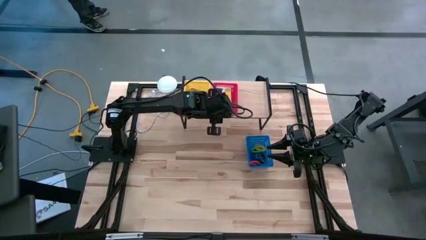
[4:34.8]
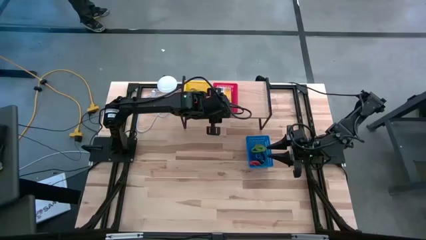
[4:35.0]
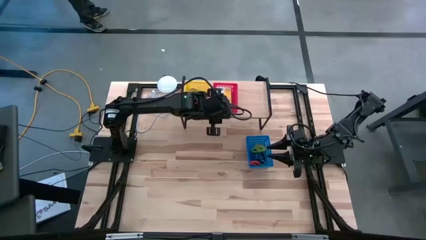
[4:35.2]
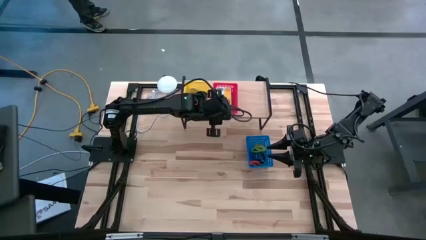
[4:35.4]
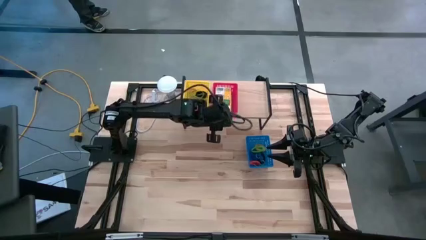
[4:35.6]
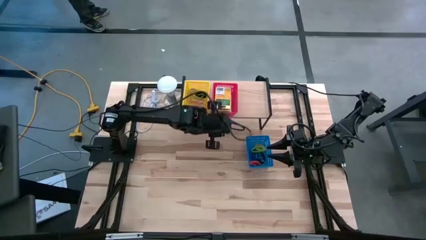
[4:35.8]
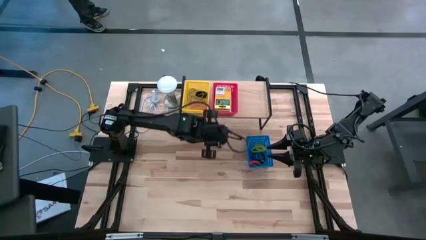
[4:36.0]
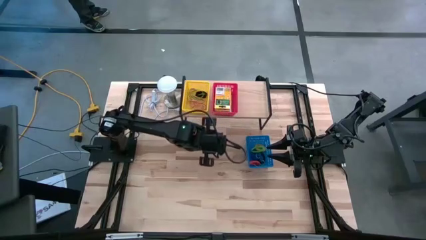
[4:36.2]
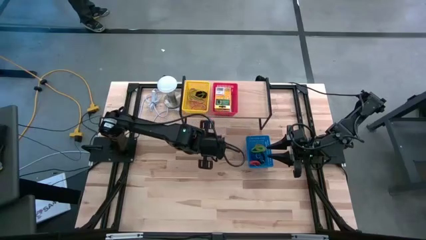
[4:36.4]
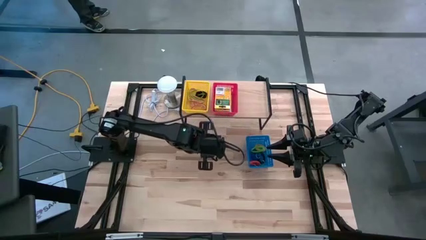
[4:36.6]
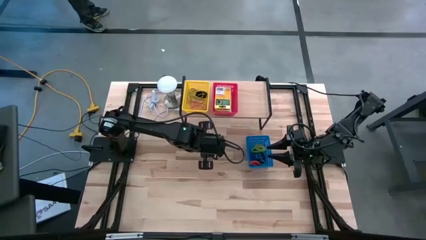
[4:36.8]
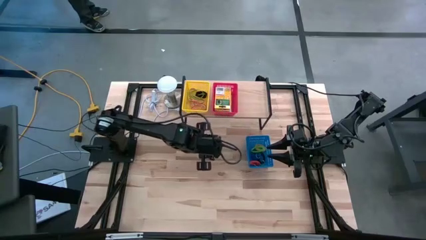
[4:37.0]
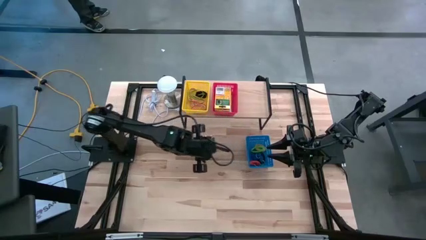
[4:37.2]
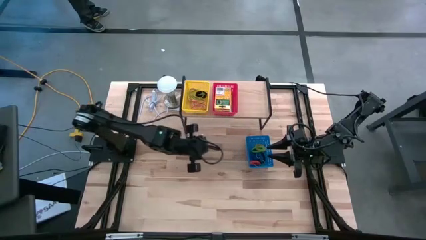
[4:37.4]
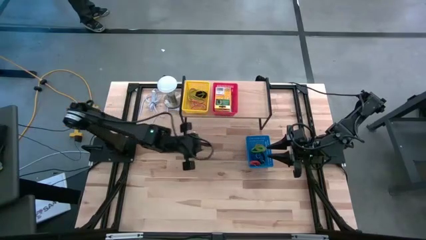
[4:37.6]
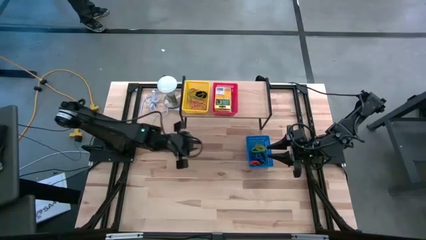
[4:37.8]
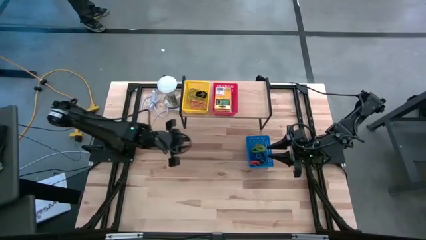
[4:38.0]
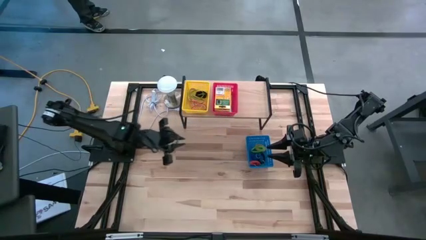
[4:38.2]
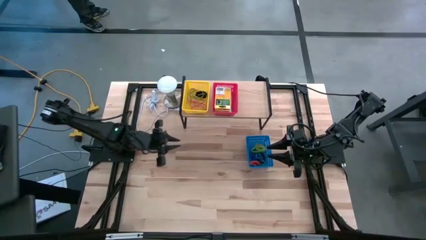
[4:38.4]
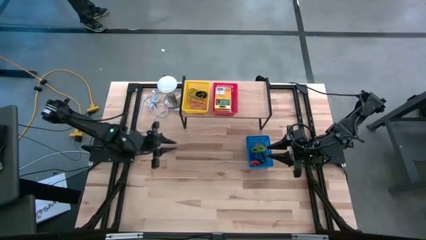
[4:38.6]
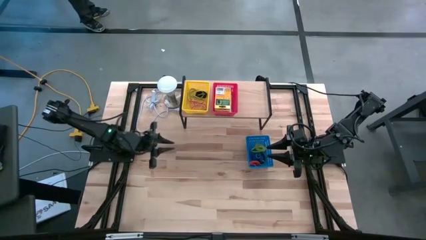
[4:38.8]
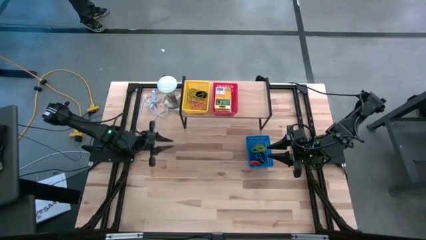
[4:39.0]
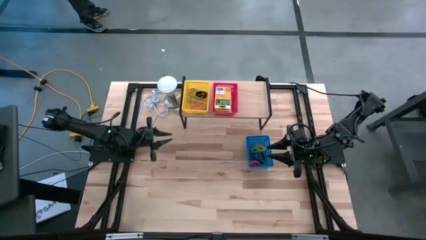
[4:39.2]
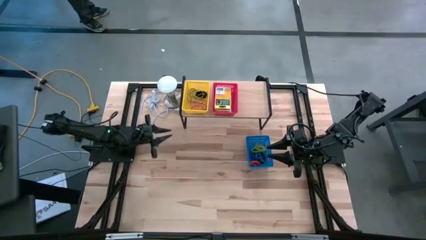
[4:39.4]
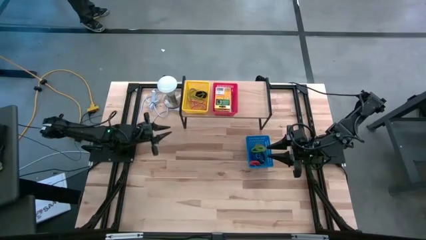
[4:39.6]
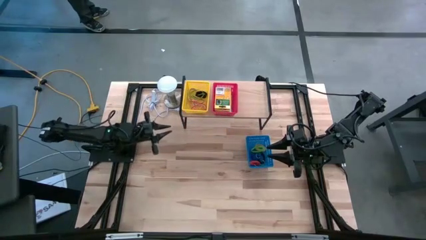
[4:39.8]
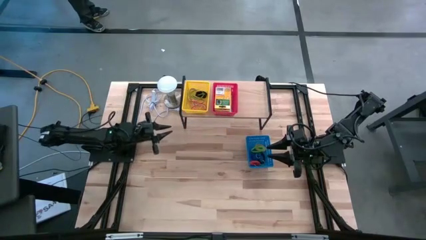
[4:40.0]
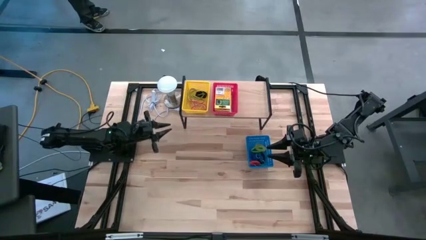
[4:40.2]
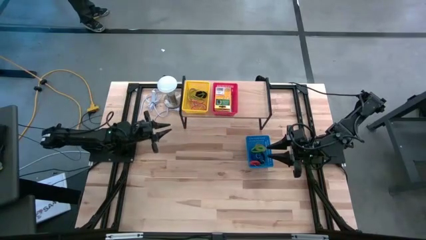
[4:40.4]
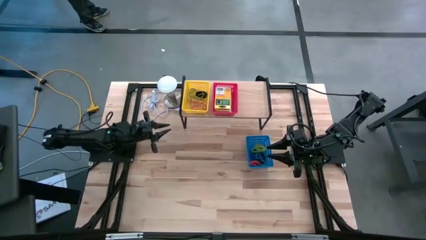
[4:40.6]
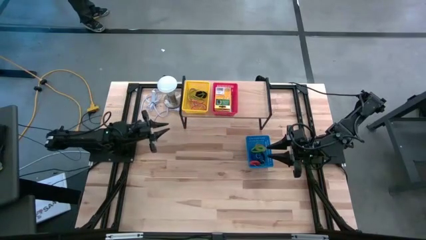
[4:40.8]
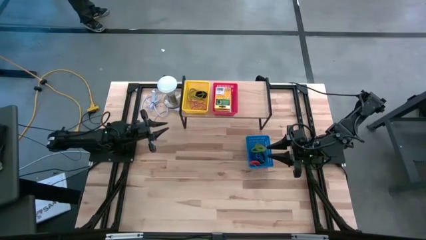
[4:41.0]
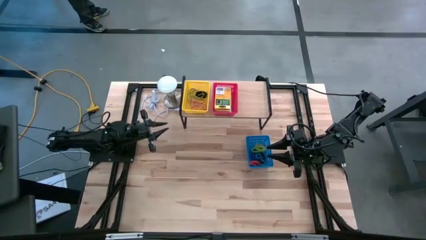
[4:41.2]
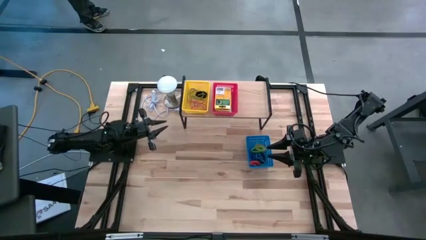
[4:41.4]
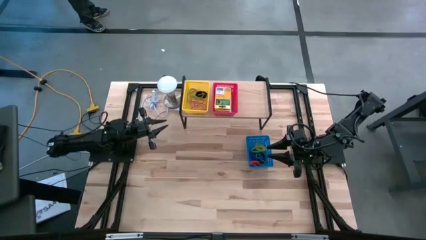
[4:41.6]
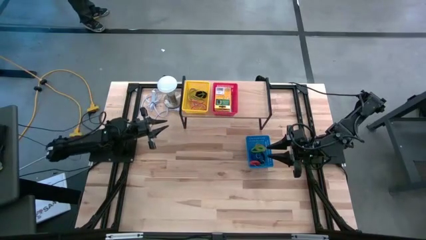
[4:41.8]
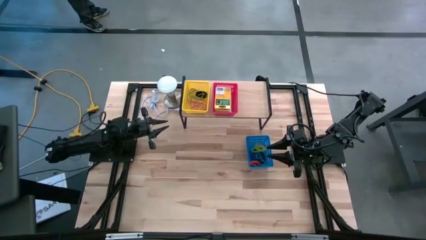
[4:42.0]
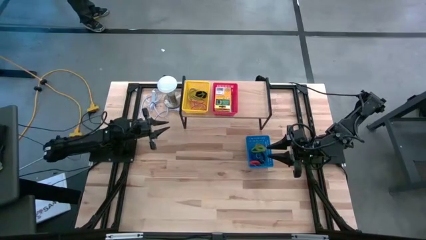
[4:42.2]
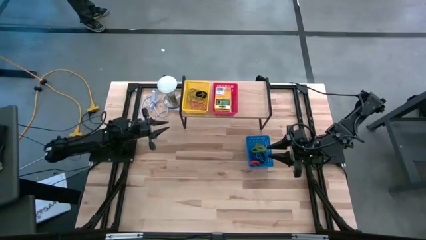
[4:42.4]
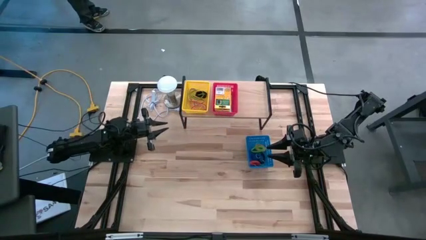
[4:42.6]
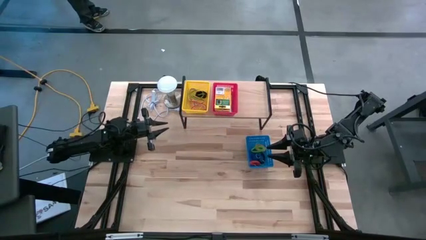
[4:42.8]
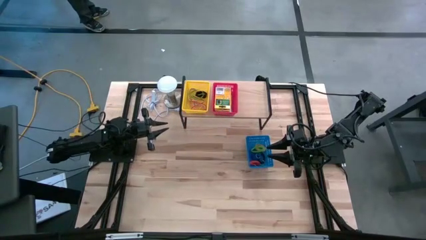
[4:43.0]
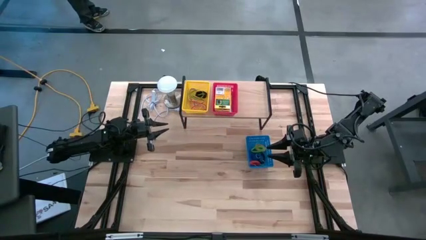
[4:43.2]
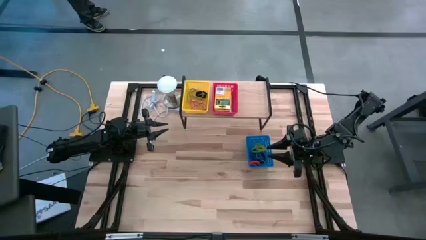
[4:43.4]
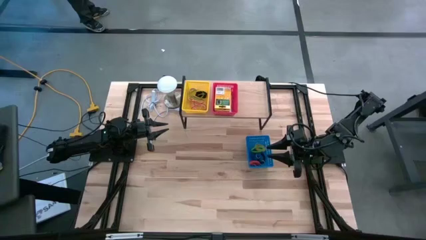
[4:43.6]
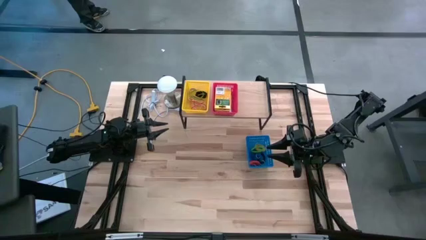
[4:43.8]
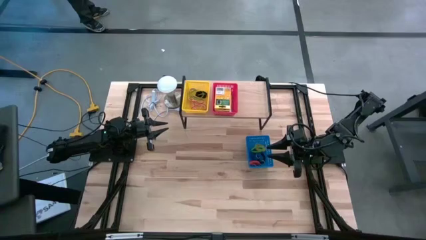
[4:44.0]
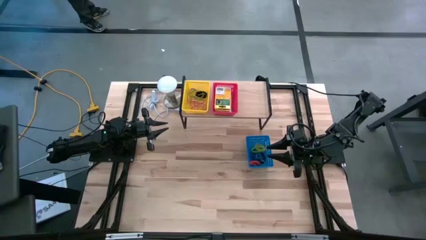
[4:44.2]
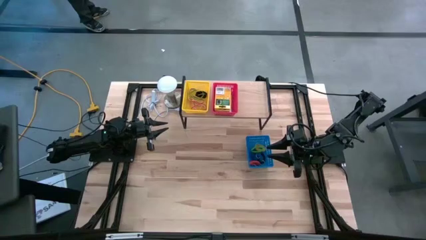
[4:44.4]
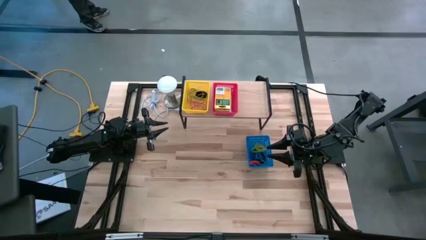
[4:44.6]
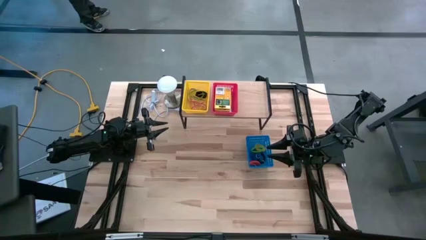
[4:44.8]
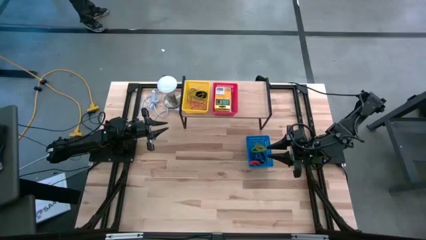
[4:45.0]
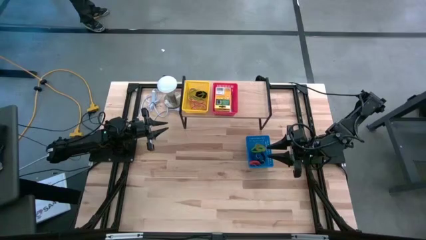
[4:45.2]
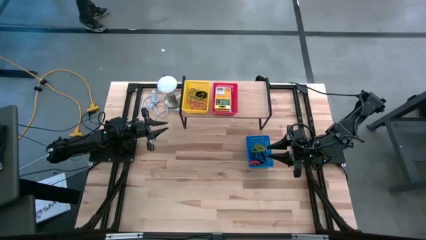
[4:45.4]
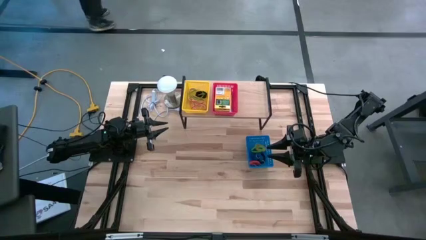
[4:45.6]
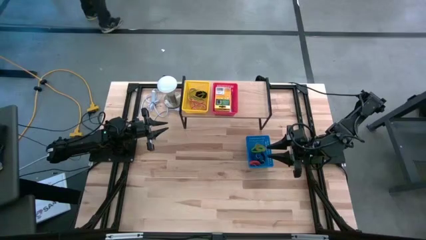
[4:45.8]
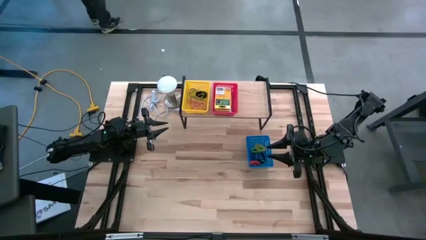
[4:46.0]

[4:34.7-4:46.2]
Task: Pick & Place Office Desk Supplies
Put the blue bin with the spiral keychains on the shelf
